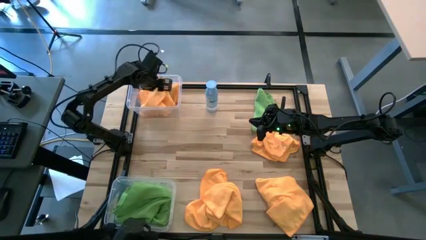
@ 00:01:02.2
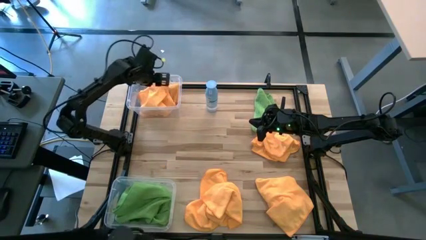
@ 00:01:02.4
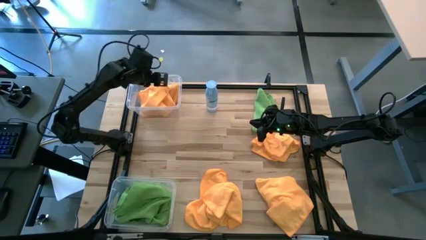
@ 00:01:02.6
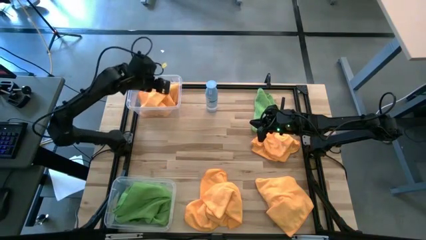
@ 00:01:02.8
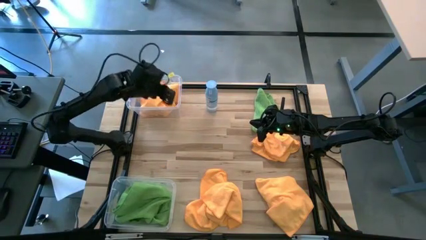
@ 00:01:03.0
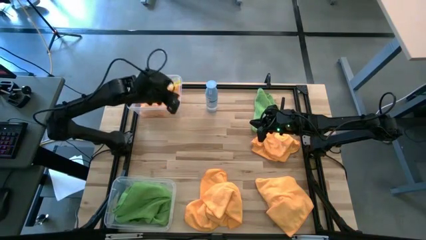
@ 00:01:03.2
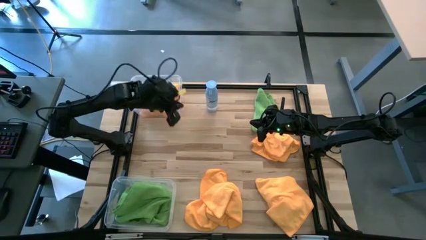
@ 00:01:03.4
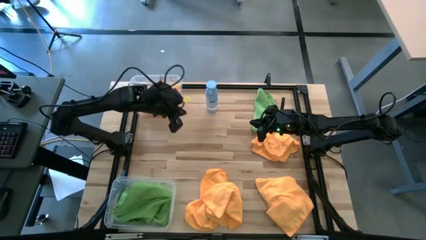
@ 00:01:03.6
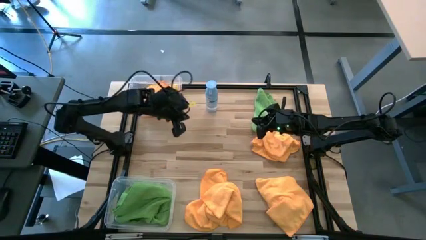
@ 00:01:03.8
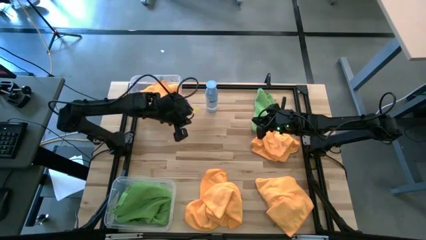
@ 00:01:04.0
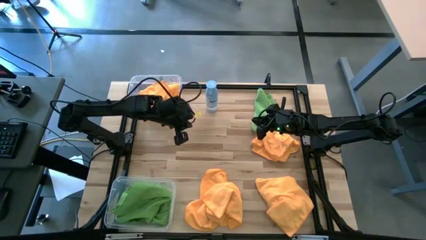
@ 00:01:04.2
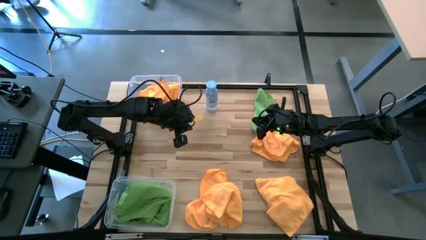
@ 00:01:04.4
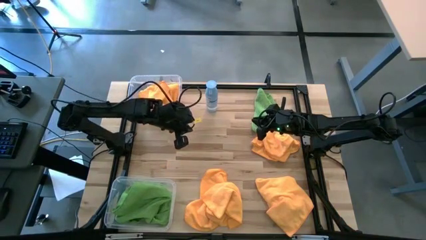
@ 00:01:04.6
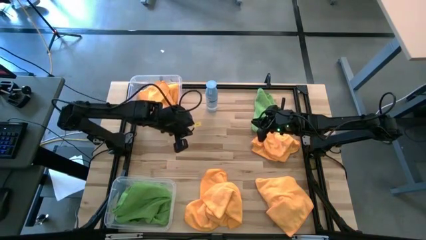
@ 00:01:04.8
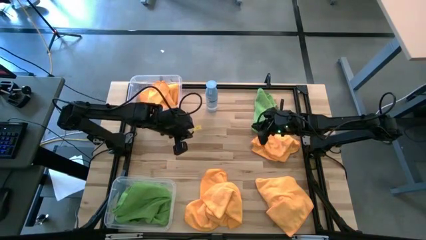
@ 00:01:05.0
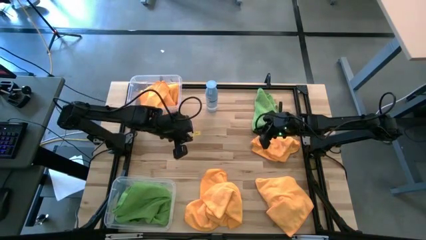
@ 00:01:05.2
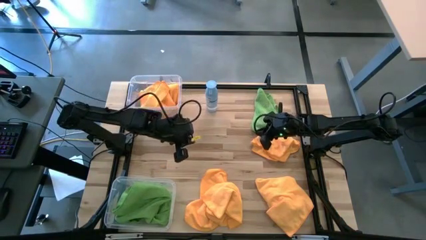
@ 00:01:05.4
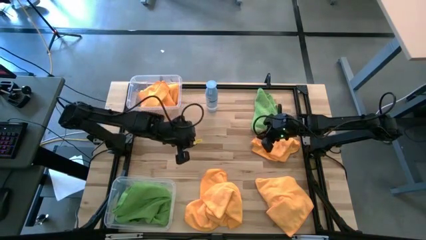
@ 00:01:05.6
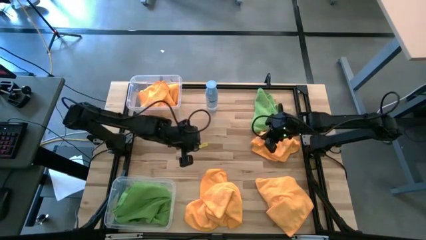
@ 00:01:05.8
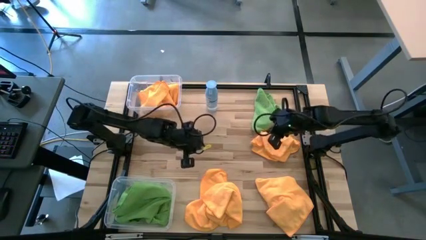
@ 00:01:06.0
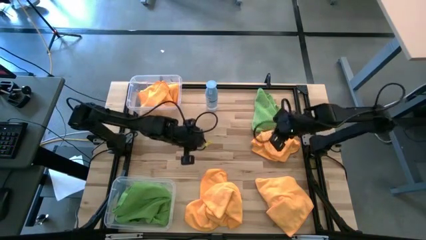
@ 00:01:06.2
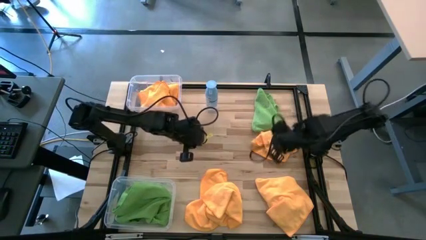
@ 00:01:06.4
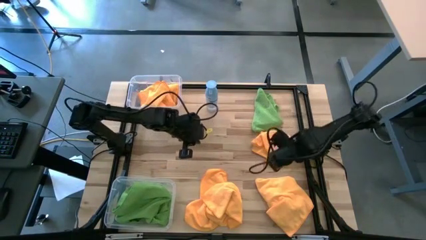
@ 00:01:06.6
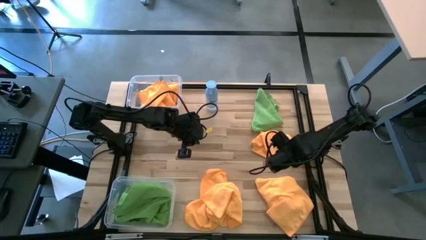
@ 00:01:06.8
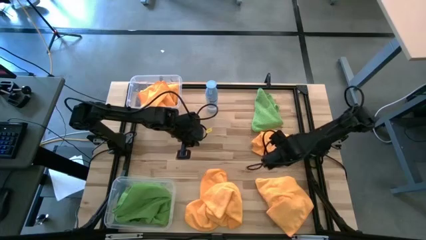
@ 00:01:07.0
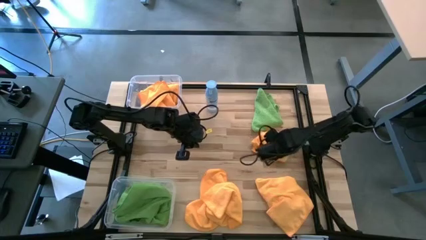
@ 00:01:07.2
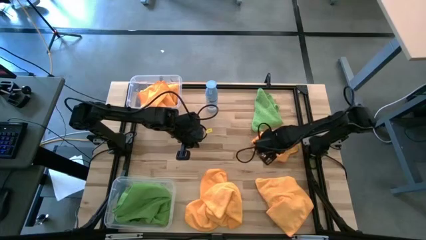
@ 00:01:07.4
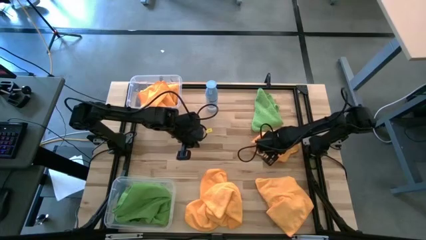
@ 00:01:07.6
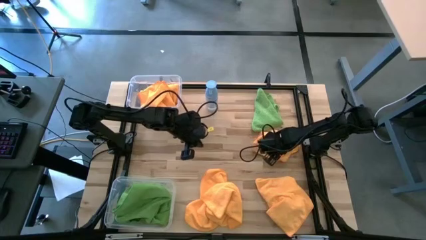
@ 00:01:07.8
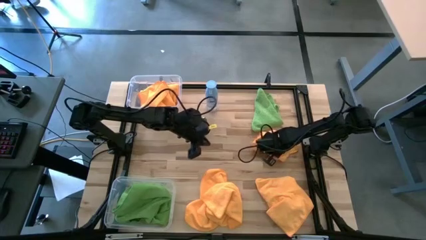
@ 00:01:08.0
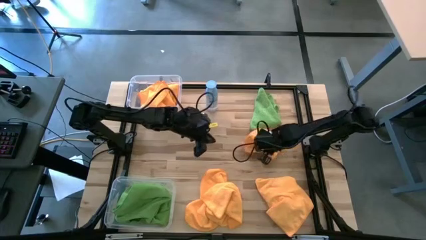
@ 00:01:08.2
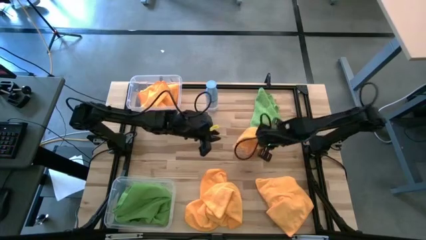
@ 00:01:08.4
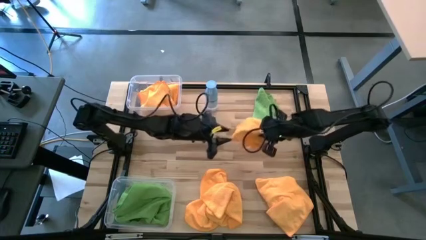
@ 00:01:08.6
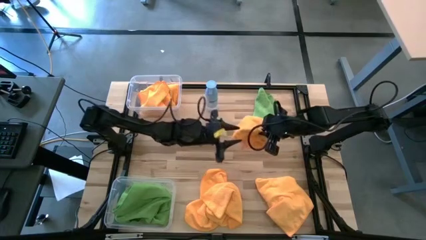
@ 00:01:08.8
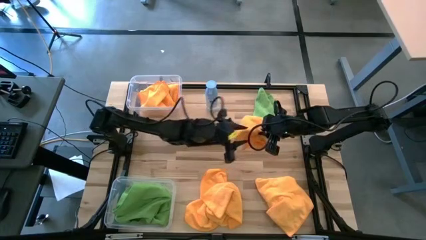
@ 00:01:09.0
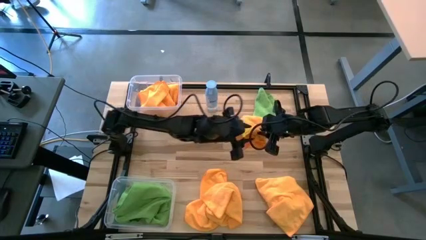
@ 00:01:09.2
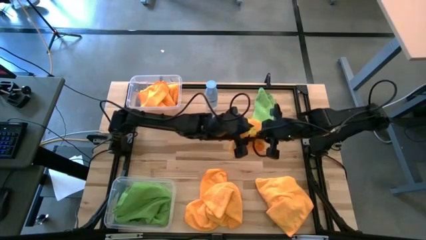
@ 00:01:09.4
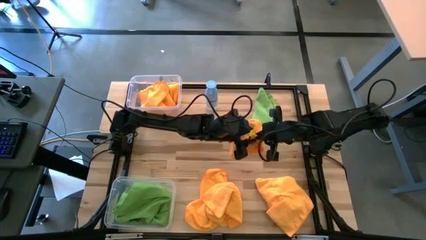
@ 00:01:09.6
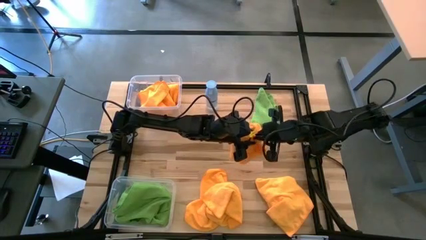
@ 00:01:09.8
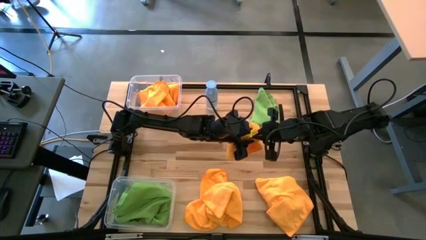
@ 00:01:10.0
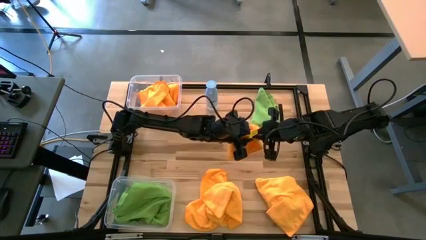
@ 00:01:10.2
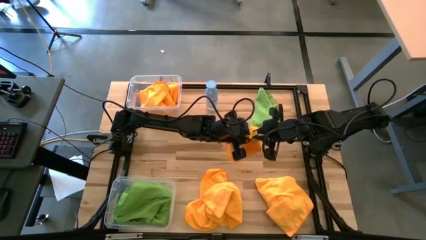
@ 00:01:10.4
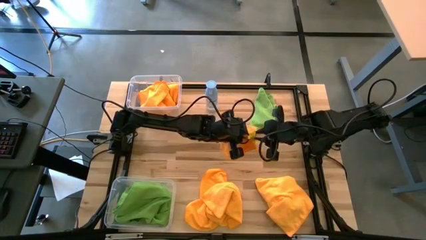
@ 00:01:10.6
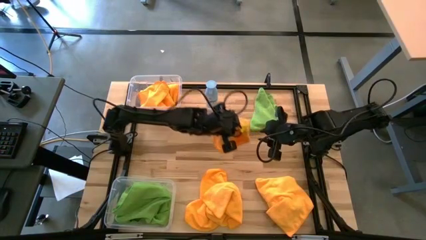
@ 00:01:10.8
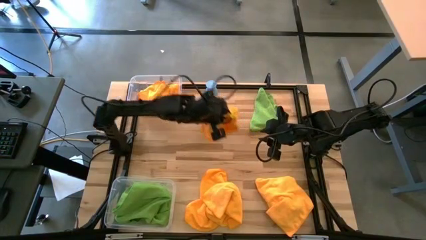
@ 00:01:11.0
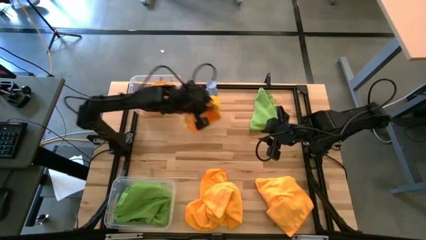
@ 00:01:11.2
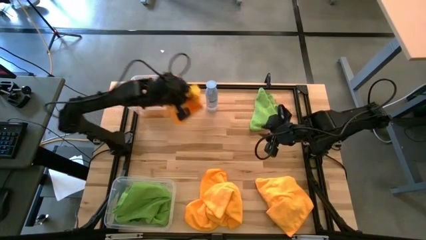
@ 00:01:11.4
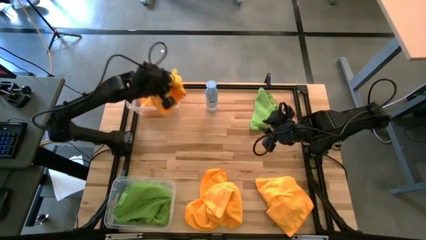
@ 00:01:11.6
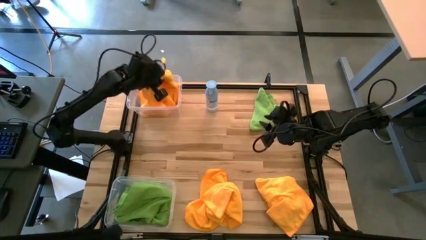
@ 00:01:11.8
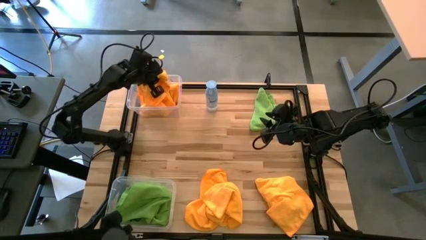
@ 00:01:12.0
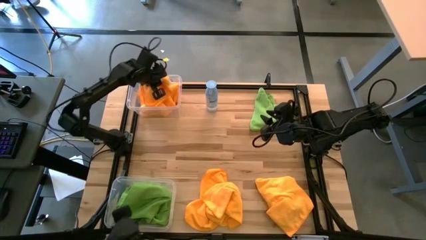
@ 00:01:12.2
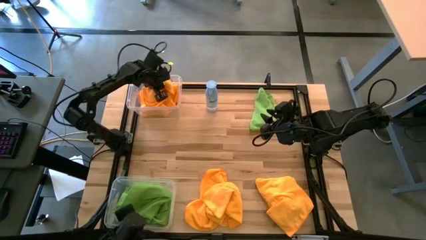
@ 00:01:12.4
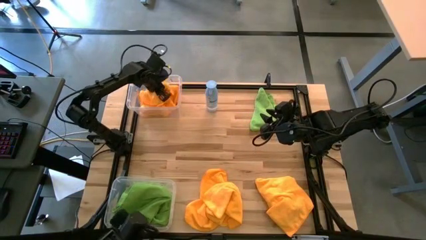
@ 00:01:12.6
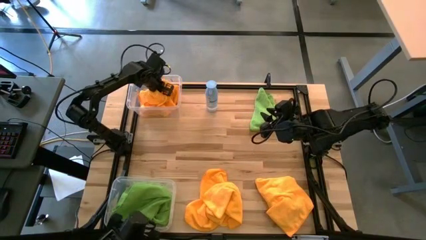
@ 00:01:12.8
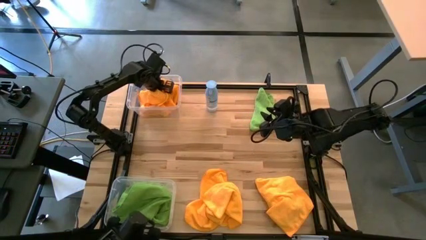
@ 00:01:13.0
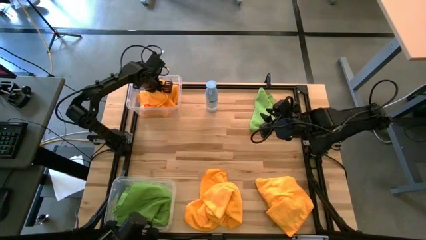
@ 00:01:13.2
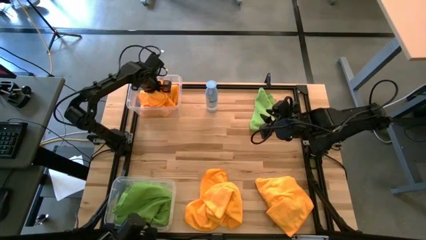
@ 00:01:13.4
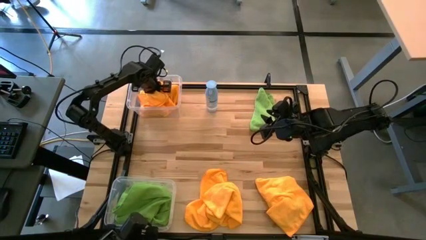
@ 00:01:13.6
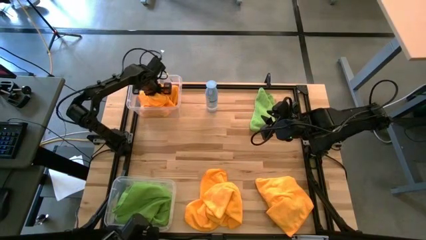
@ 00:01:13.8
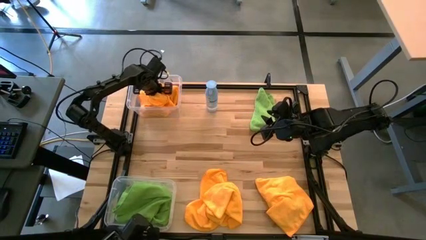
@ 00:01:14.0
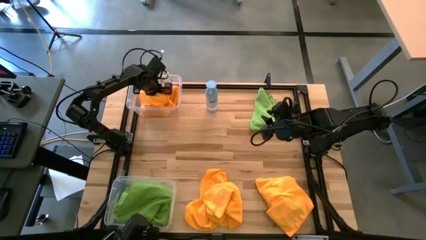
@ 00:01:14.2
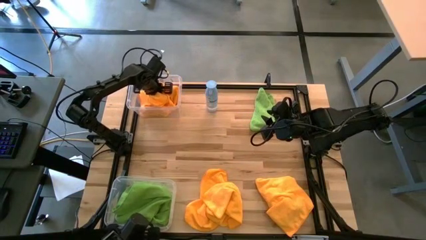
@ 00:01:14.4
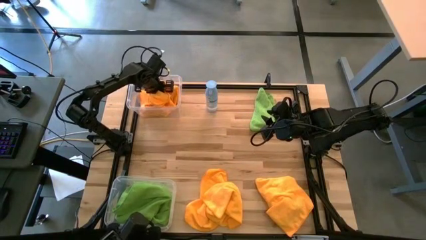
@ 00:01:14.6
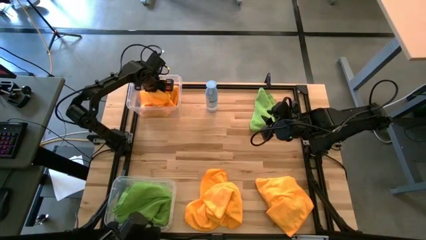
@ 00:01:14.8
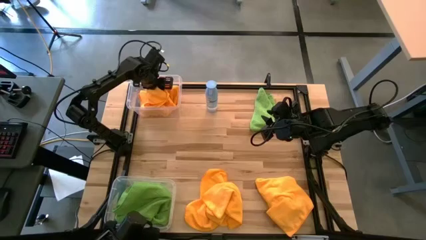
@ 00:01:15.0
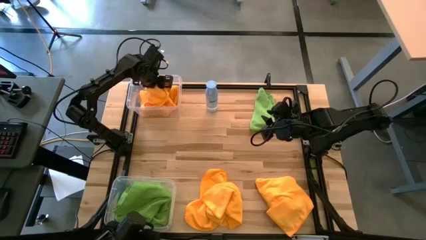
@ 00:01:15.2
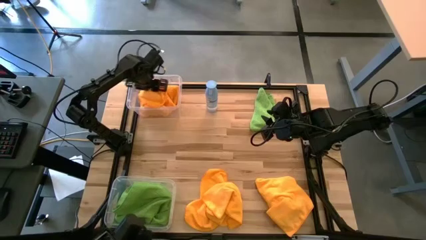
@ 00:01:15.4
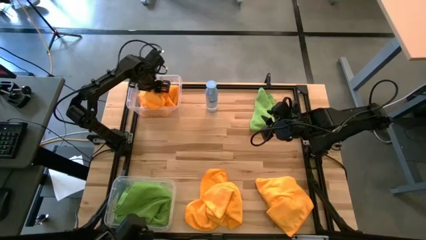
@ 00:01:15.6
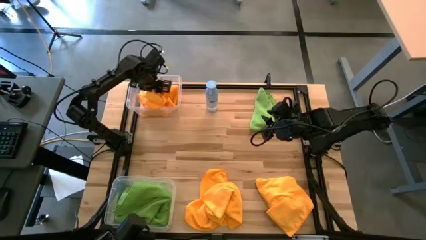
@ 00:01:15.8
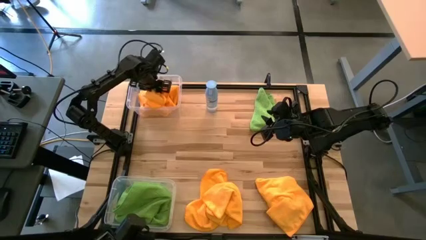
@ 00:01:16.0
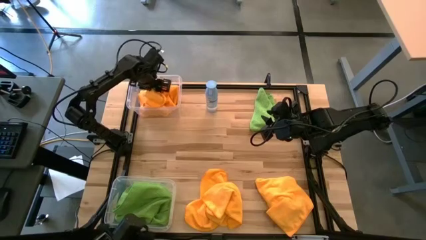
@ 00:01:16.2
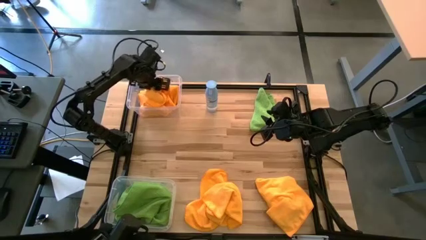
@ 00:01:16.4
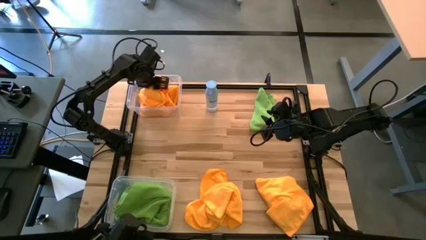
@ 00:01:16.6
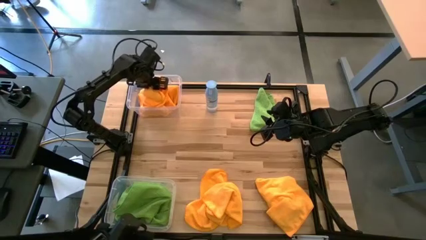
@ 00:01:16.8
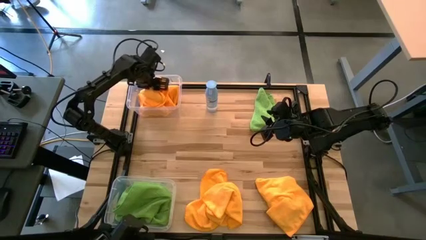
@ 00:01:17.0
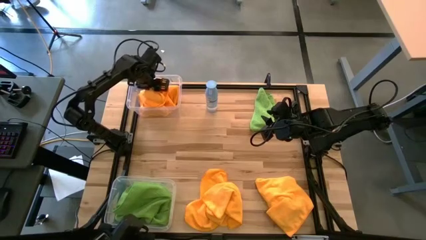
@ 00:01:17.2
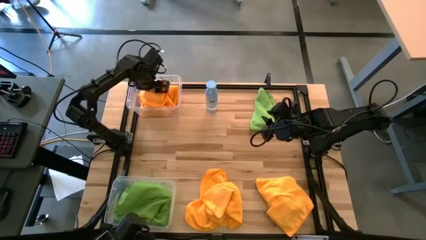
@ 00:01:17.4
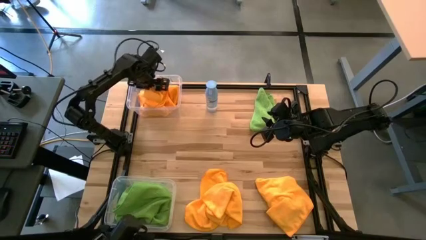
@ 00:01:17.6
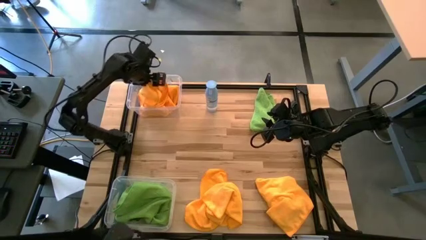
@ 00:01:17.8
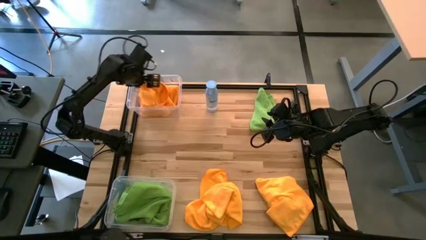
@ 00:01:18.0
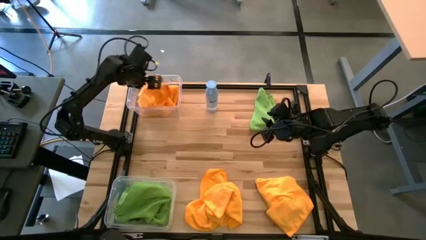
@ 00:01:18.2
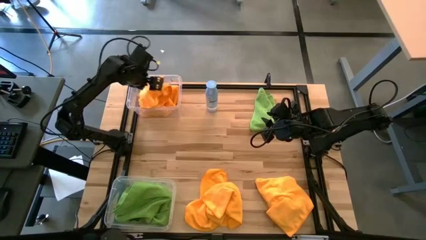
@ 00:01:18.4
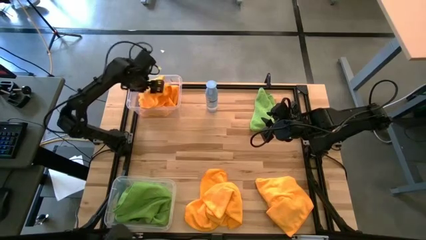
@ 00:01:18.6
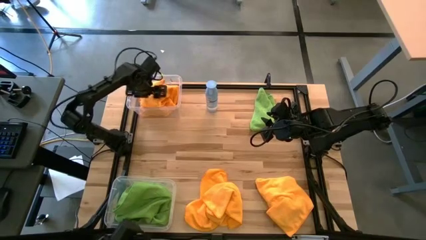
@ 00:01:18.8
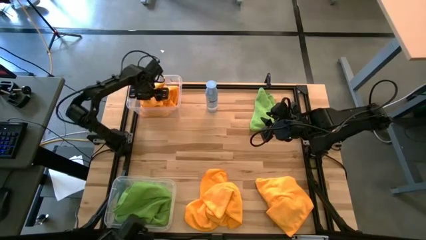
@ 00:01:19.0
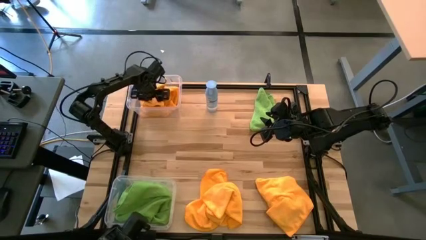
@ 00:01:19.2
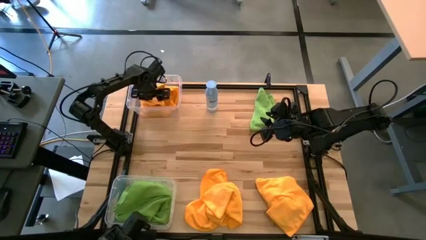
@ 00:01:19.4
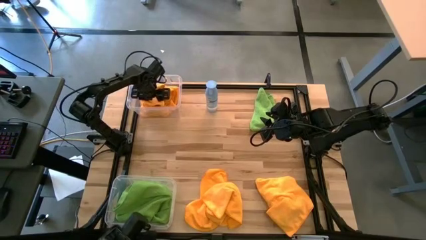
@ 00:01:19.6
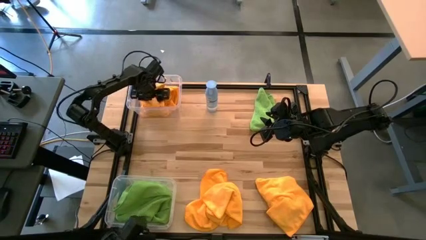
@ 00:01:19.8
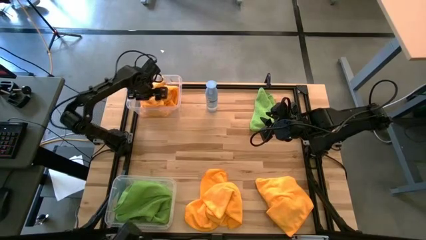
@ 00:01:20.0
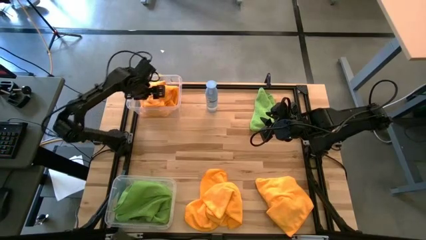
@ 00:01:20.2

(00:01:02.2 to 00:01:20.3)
Task: Sort microfiber towel by color & place in baskets
Put the yellow microfiber towel into the top transparent bin
